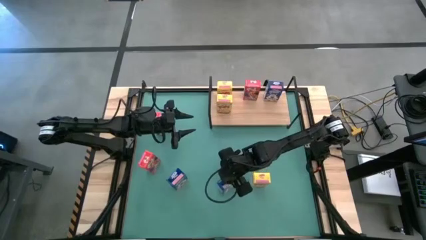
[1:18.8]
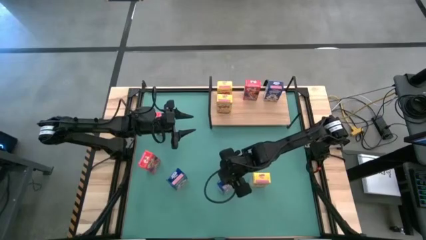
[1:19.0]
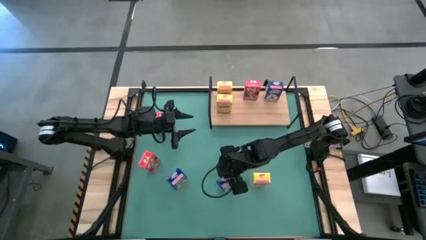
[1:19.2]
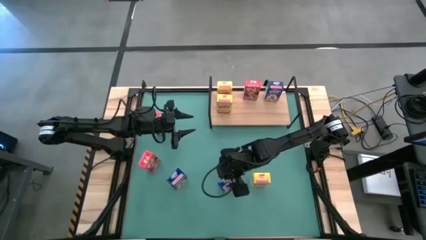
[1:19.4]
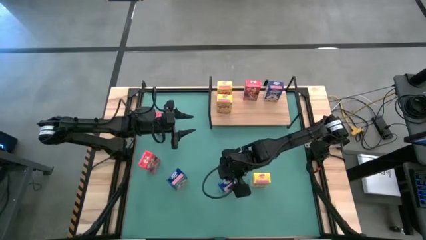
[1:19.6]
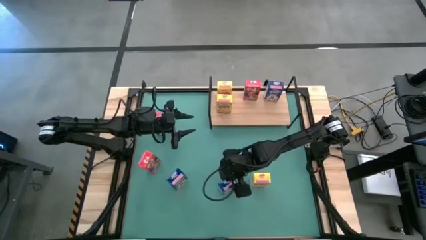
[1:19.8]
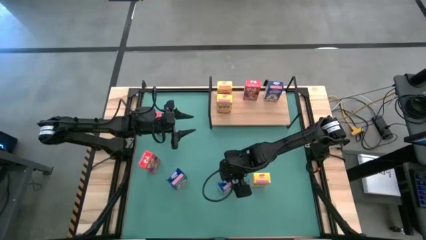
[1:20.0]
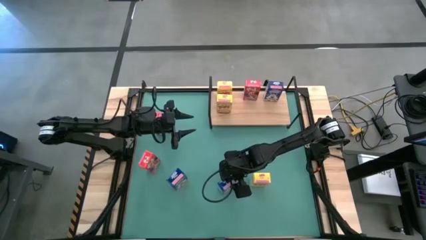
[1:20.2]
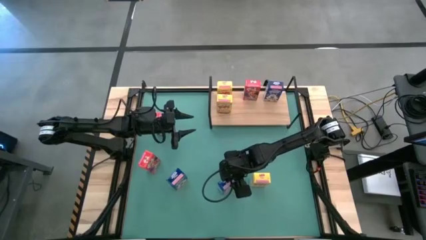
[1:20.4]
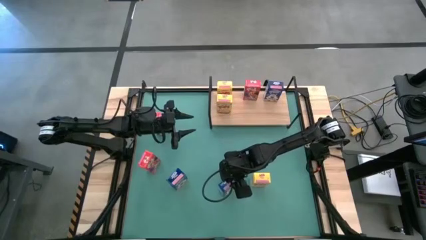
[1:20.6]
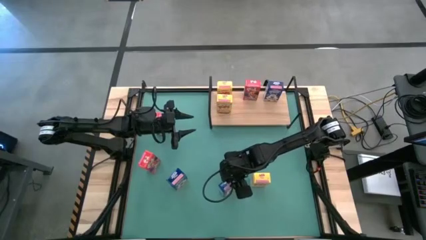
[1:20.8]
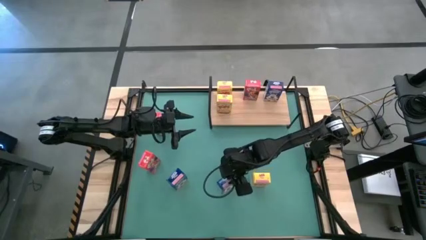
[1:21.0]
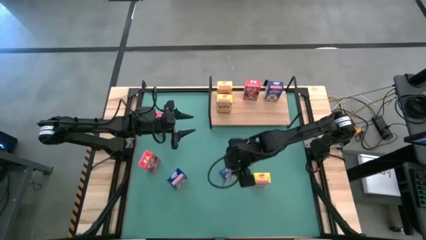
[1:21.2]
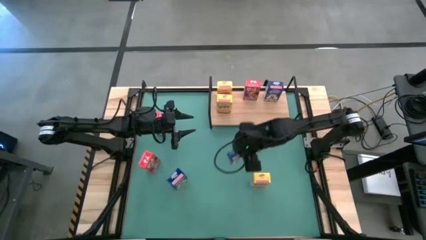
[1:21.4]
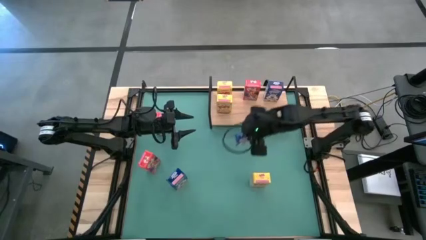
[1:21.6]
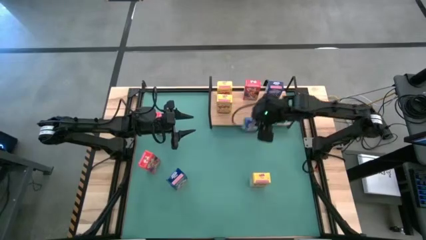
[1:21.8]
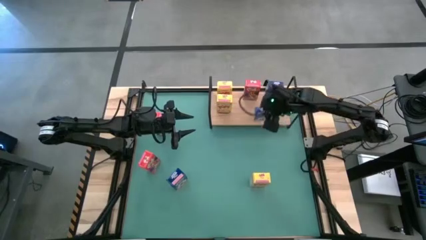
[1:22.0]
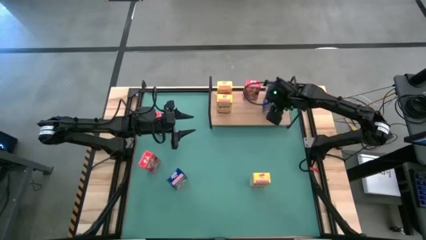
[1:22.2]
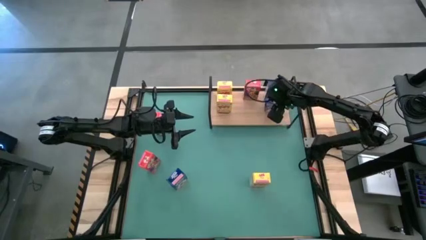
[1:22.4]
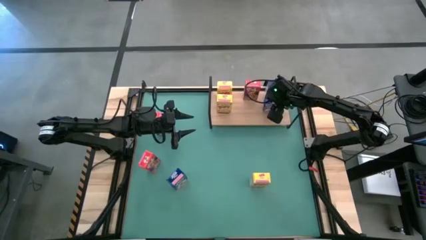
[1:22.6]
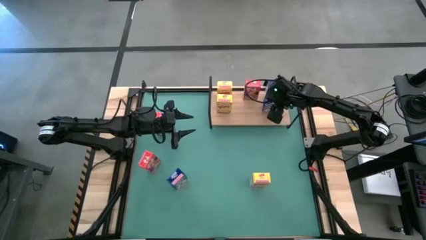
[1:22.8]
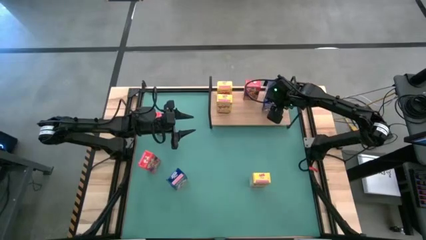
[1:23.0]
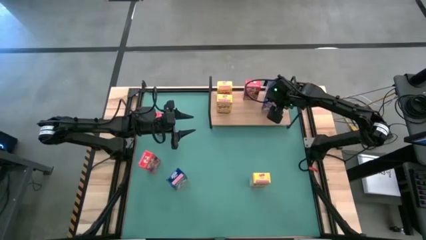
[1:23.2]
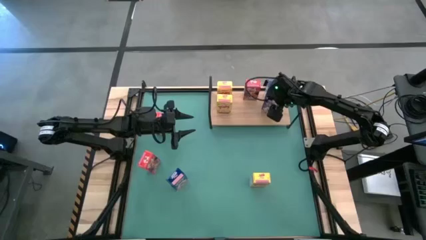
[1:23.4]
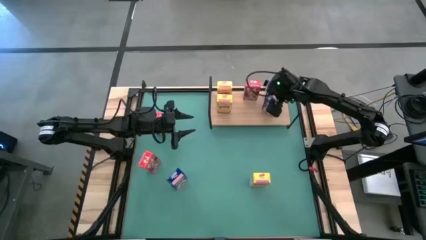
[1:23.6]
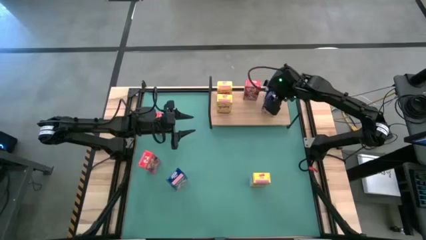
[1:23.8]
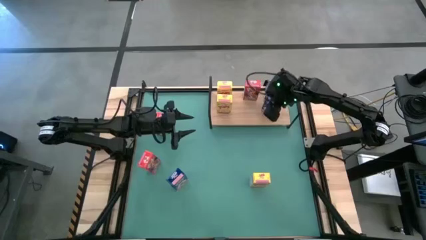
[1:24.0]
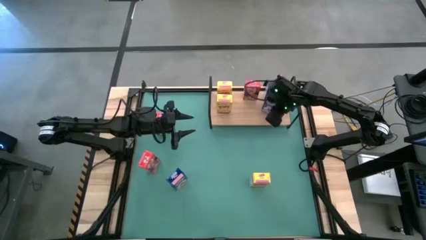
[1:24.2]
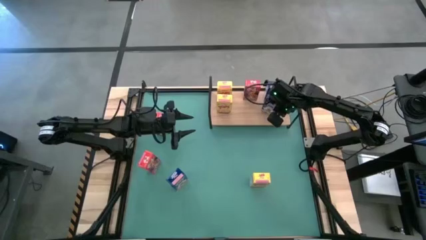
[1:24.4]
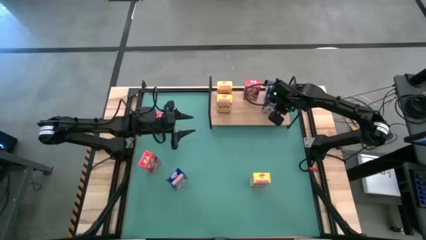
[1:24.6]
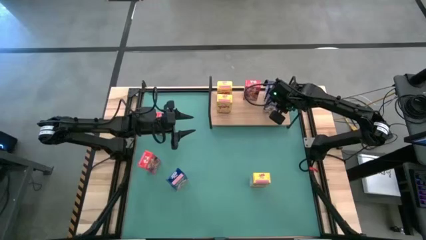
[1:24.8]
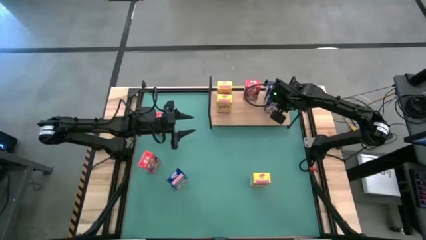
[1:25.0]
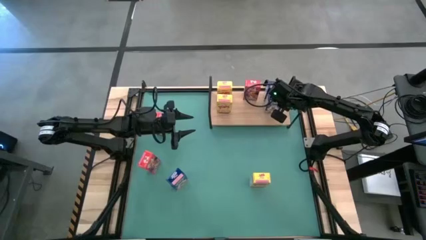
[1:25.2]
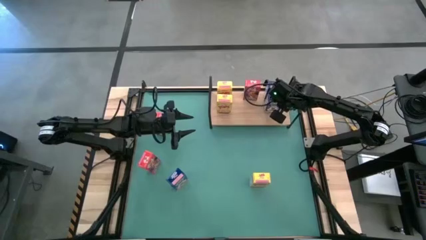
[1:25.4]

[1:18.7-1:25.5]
Task: Stack cereal on shelf
Put the right blue cereal box on the shelf aligned with the other blue cereal box

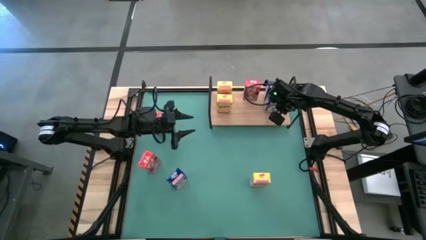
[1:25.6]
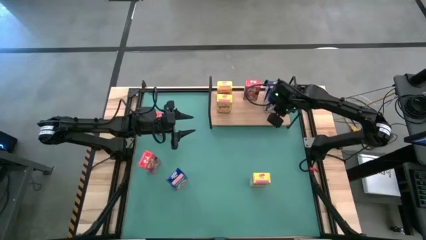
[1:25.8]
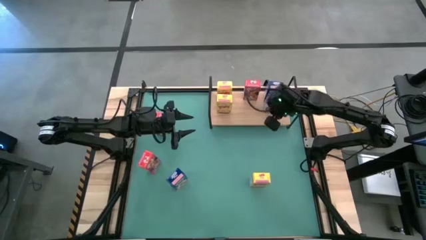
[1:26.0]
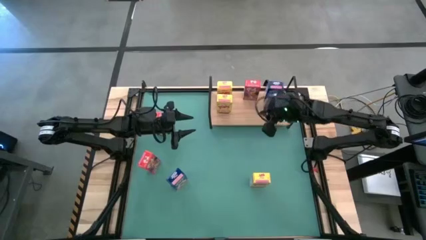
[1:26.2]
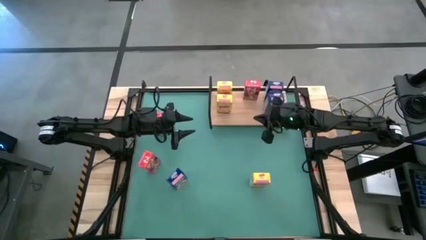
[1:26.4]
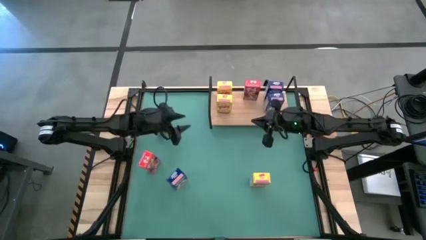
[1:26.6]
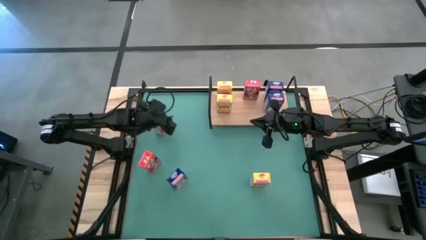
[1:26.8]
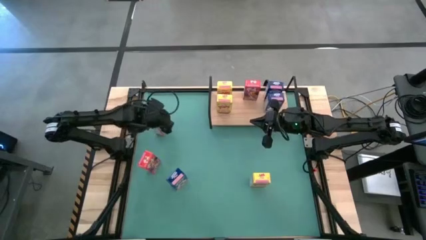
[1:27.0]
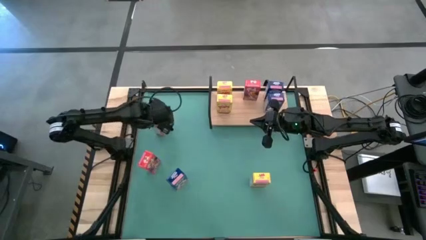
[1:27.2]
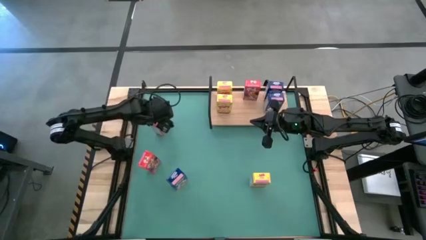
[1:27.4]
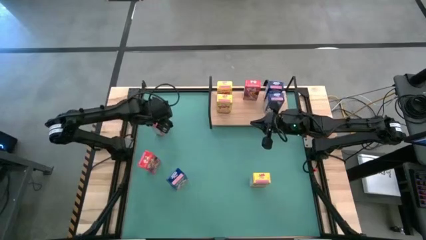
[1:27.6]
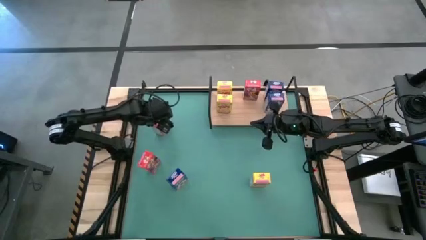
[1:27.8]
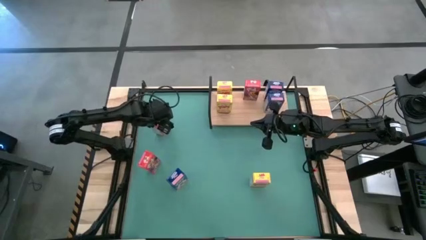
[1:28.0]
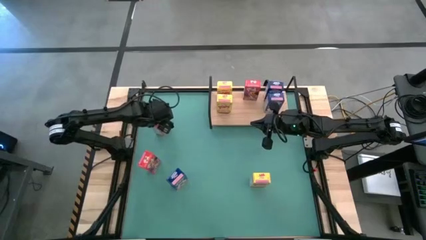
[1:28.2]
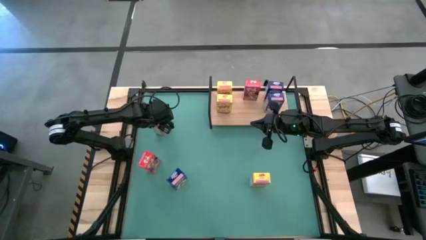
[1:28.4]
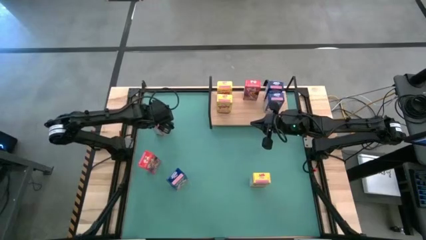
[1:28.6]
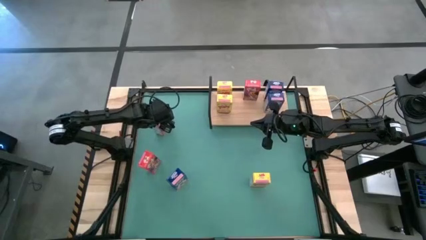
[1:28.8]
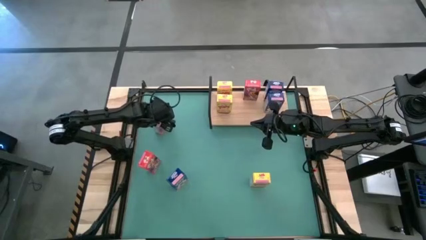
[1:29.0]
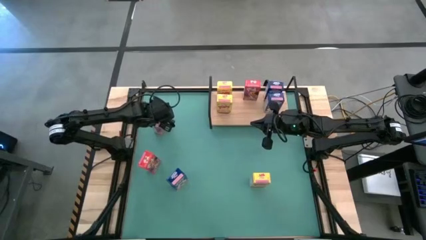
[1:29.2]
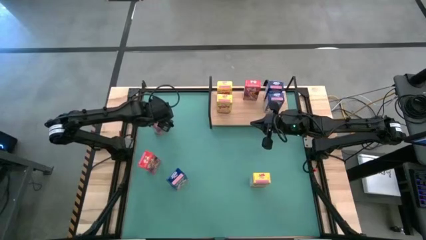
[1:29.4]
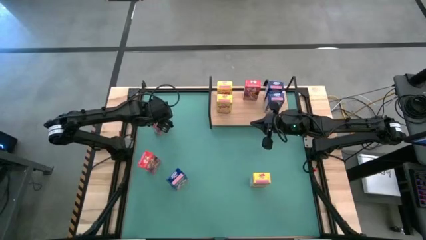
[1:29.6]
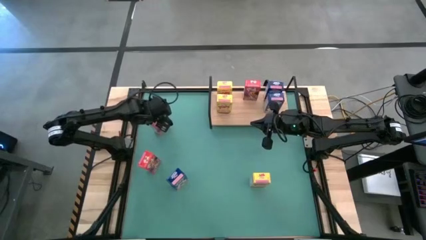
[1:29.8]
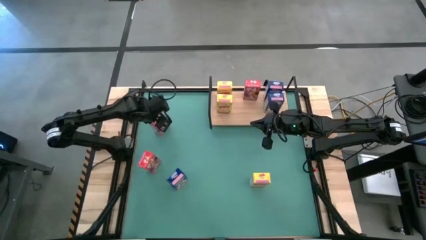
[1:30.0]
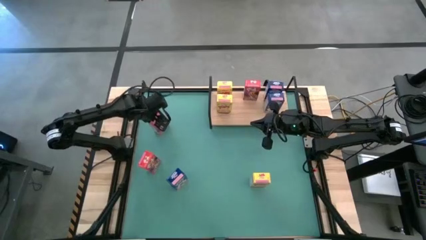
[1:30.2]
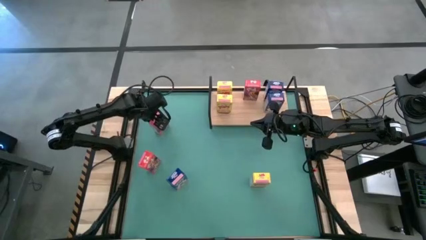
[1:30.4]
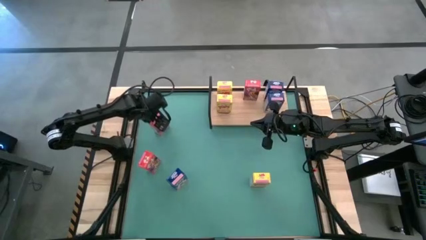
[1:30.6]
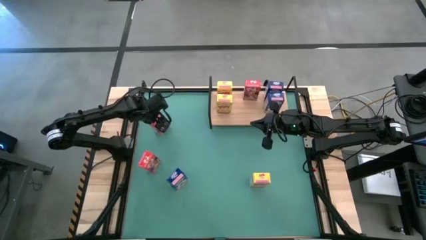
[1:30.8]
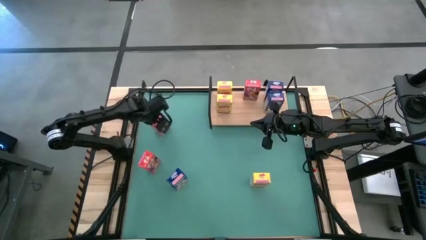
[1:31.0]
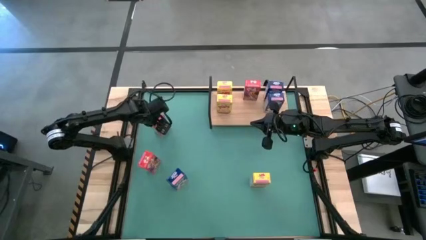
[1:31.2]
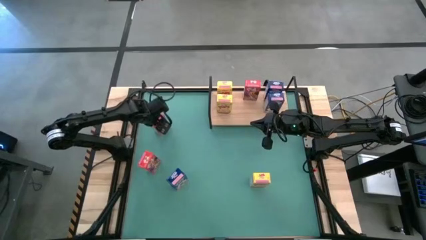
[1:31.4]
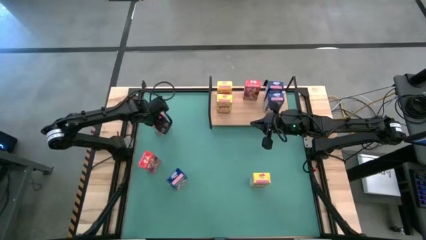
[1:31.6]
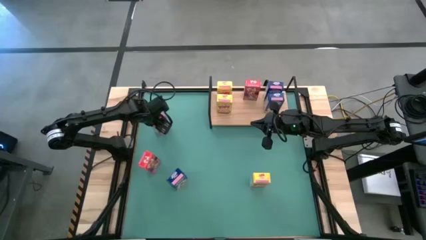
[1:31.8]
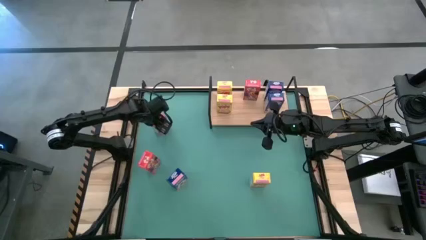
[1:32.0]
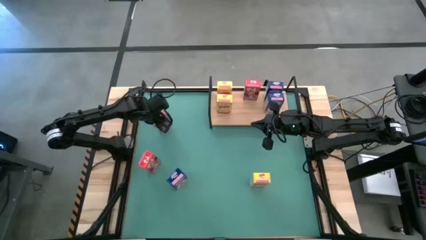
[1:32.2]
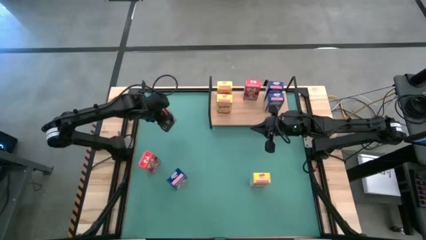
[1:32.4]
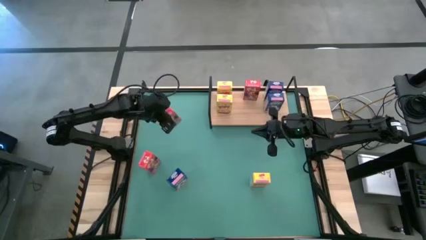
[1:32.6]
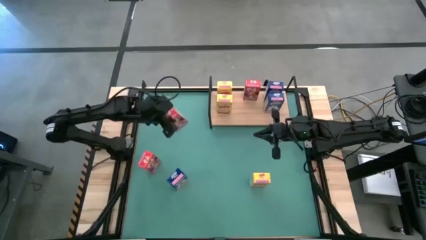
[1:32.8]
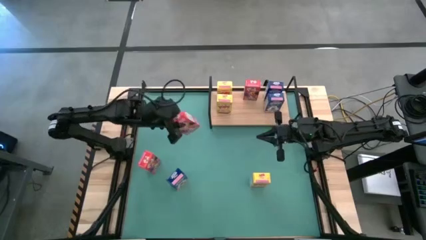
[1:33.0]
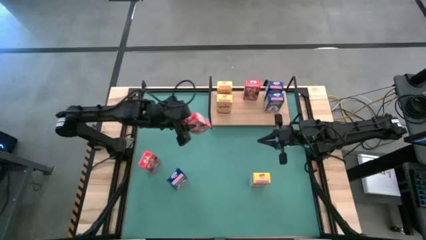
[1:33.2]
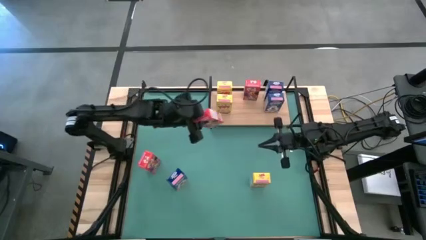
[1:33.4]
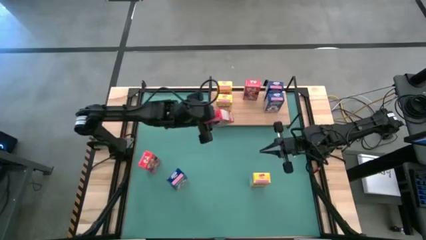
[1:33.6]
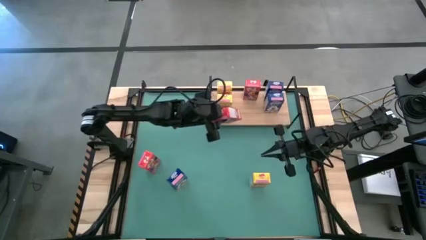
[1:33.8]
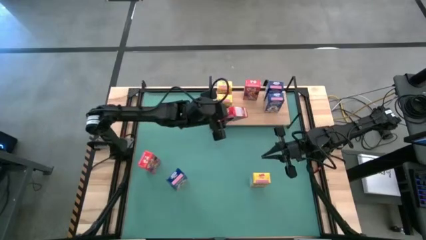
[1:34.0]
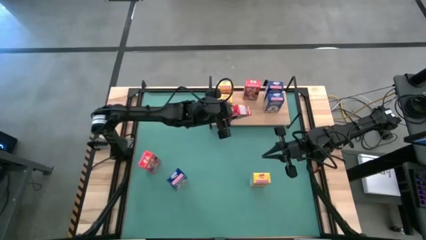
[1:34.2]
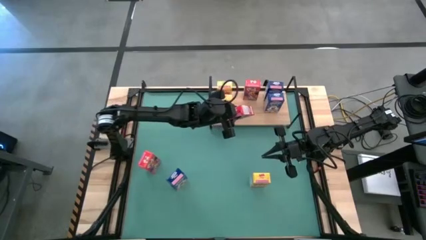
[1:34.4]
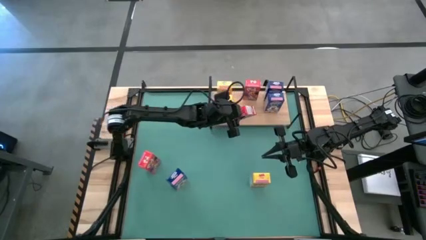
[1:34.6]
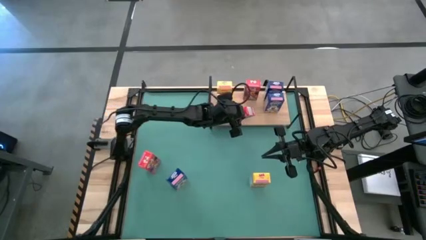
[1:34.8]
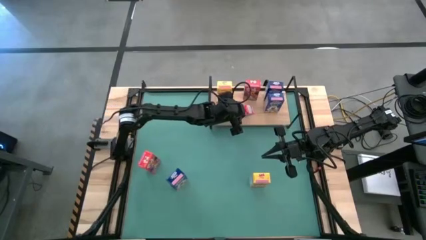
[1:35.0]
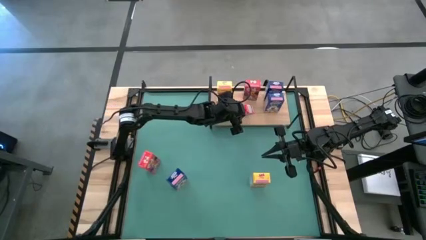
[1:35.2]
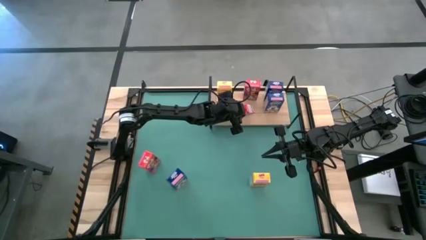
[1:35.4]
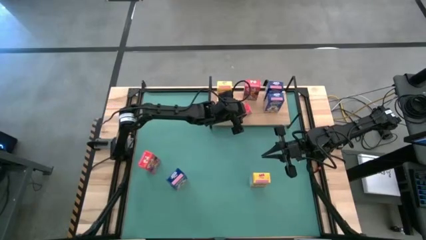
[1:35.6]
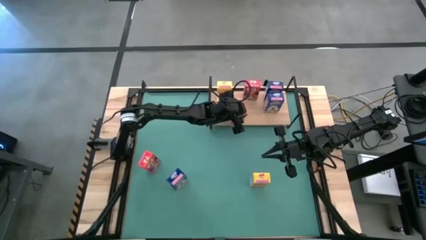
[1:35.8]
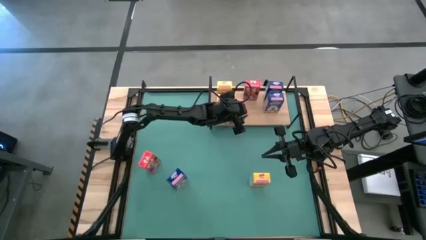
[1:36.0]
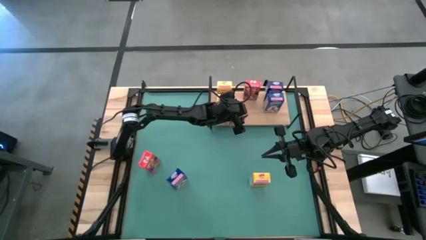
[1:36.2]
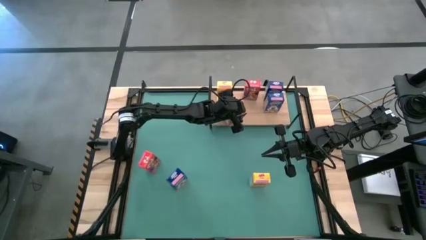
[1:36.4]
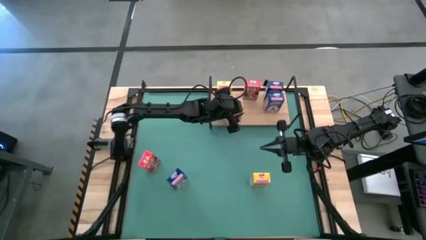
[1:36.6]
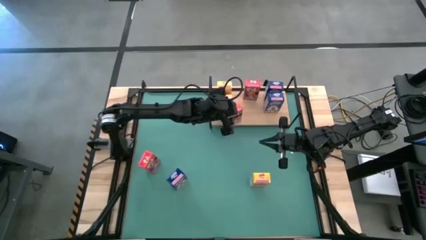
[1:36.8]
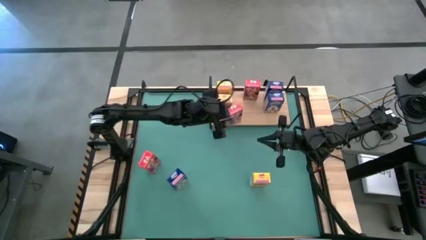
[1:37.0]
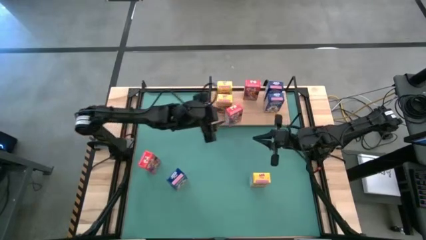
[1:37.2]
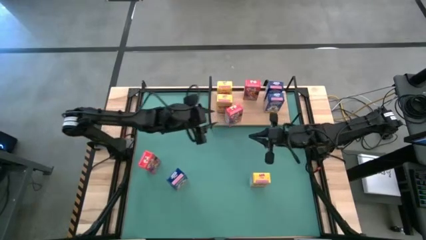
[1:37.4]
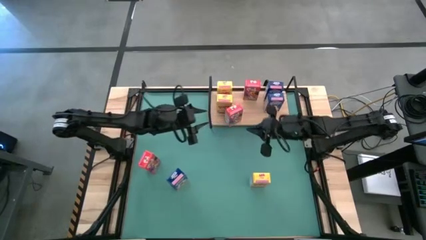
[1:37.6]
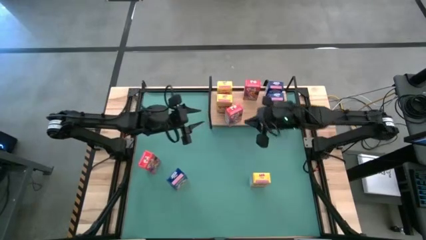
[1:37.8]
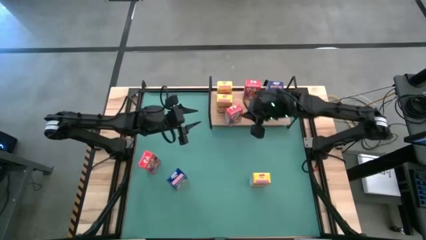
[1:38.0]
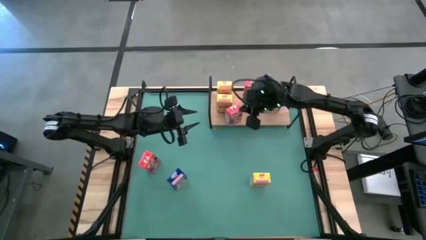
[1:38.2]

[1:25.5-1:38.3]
Put the top red cereal box on the shelf aligned with the other red cereal box
